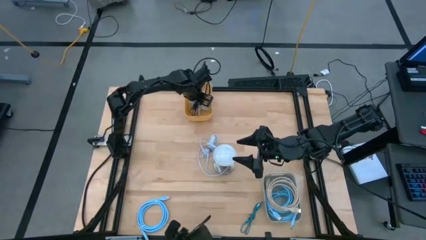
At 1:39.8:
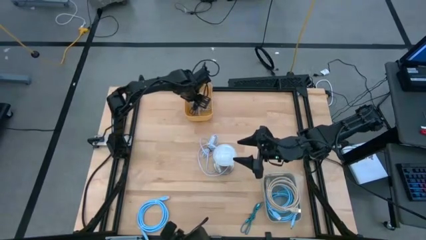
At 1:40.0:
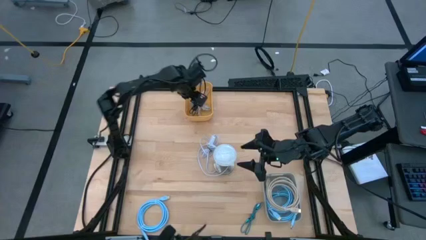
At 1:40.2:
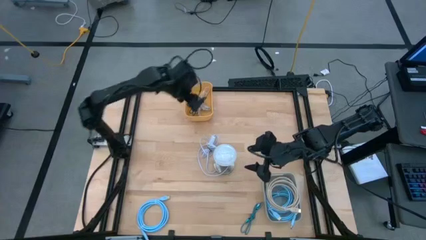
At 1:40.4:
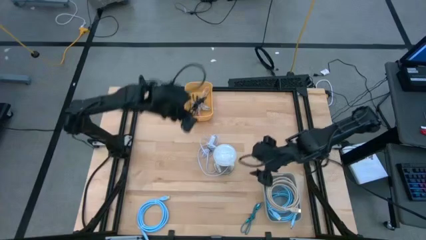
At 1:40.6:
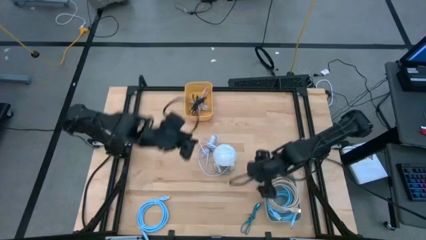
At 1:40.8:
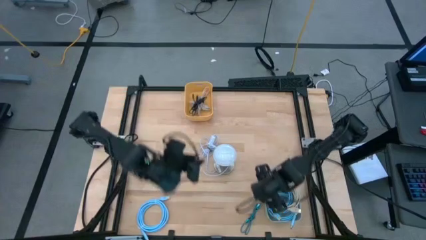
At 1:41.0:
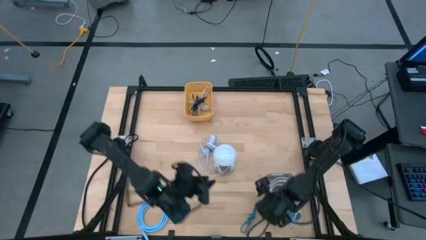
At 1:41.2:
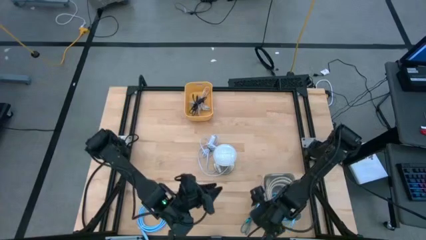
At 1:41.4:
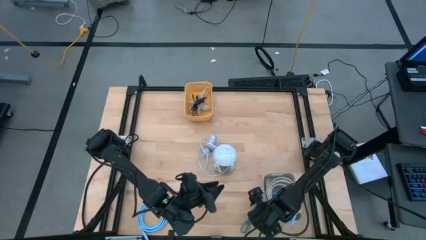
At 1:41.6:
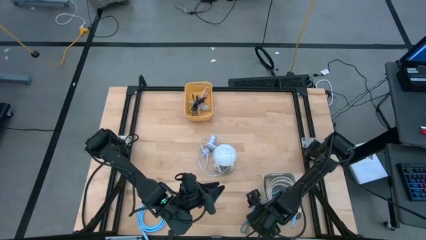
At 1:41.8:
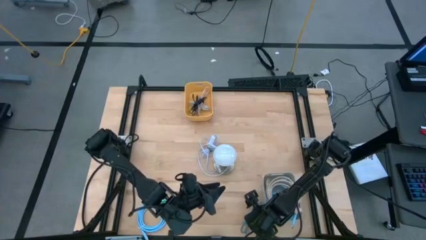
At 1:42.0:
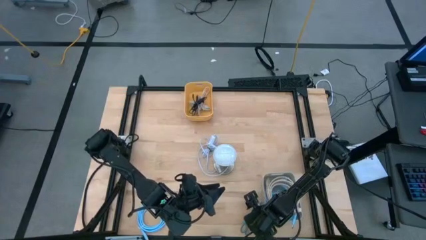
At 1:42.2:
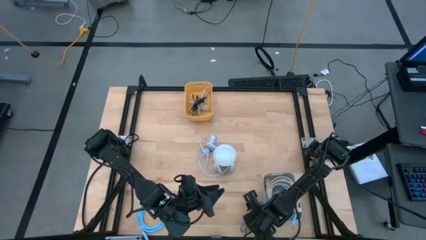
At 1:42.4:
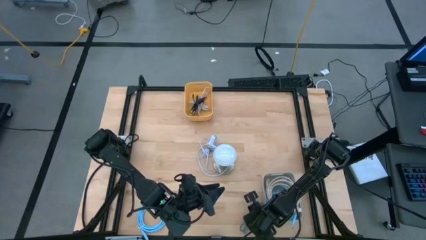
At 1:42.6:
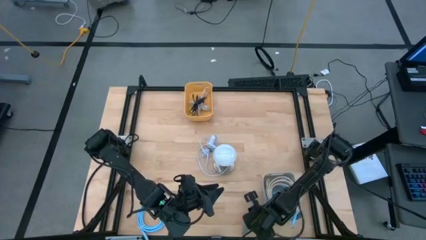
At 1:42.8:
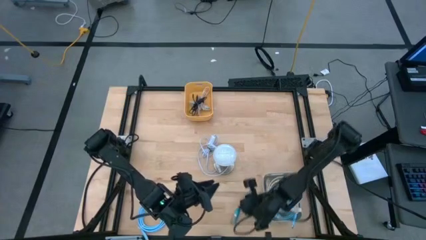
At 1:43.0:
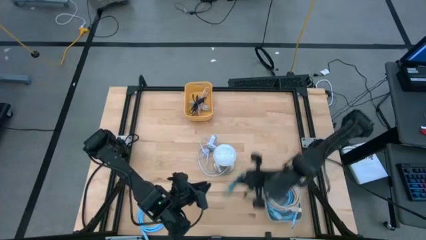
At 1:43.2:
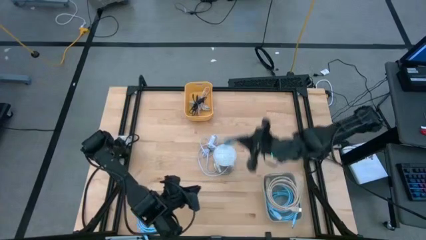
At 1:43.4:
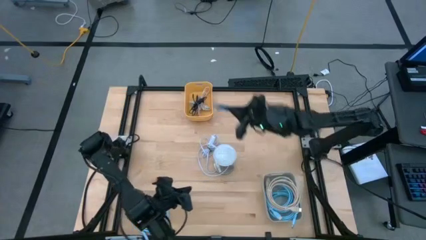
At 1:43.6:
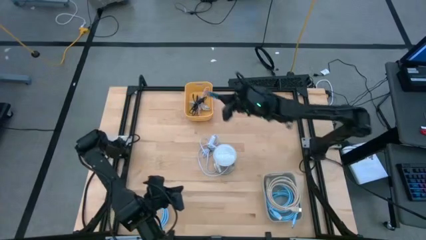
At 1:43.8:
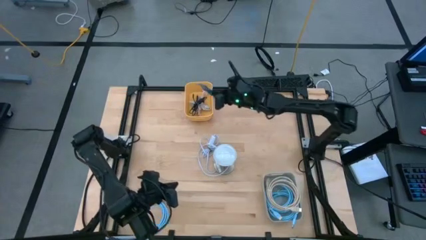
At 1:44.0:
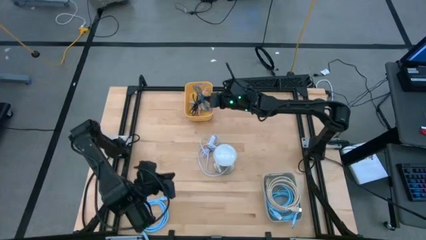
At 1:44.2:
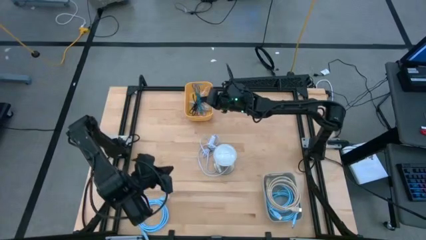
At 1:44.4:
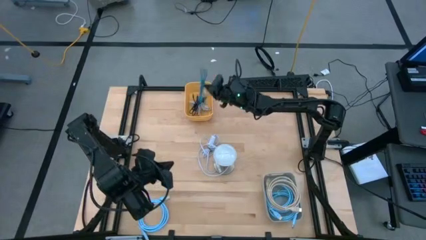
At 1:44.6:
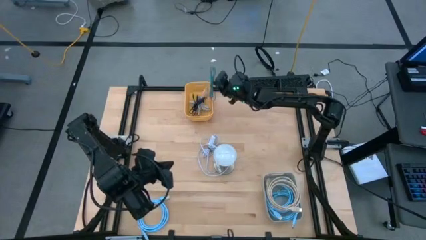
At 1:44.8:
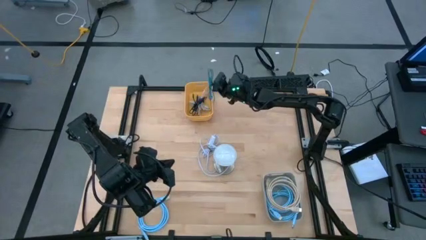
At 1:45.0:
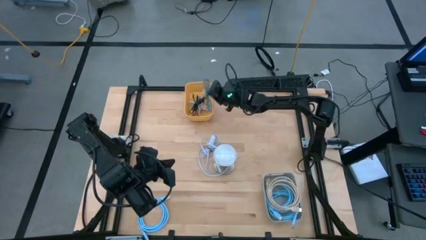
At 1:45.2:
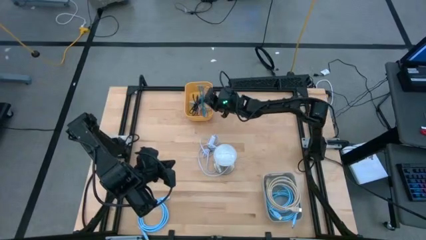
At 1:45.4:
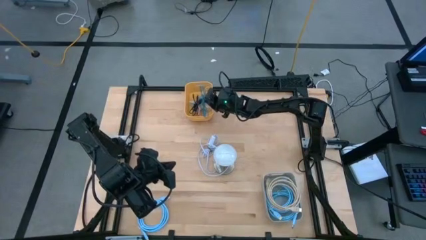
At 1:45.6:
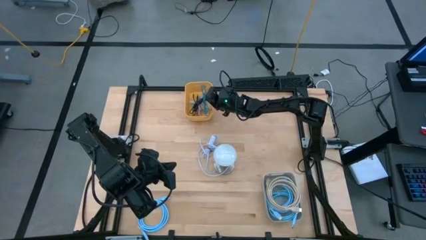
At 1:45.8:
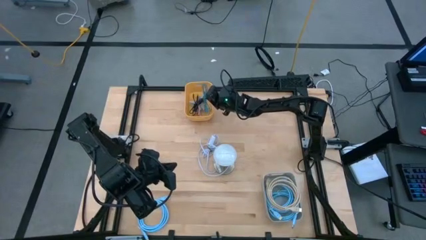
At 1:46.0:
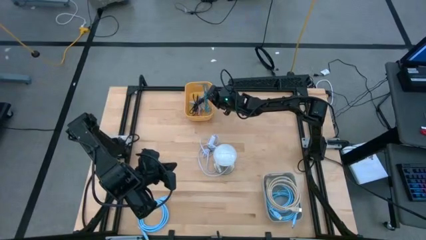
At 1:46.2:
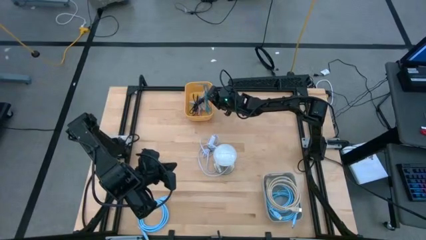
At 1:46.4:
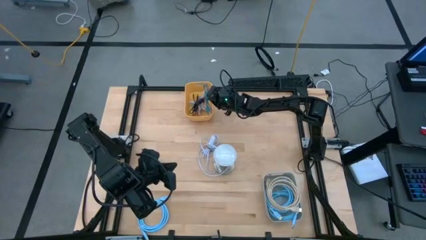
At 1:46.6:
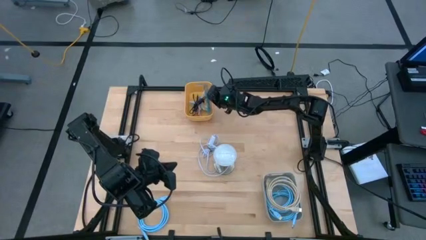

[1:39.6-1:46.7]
Task: Pick & Place USB Port
Put the blue charger cable into the yellow bin
